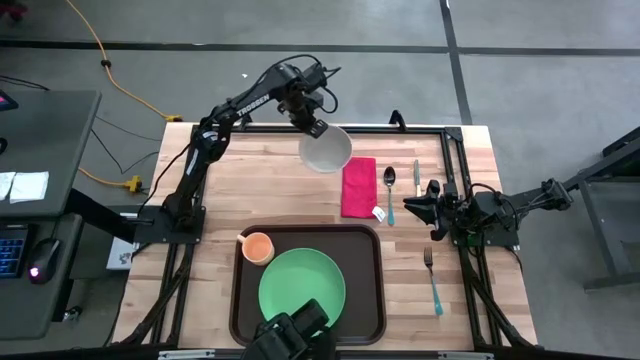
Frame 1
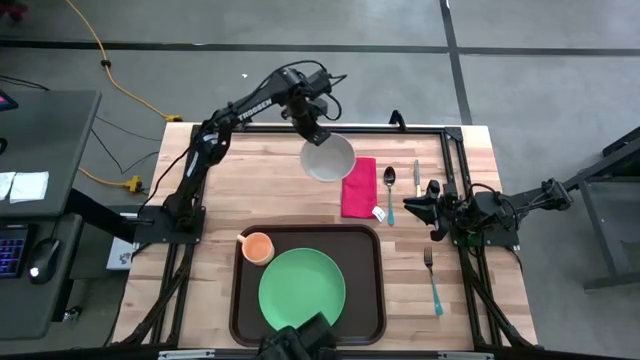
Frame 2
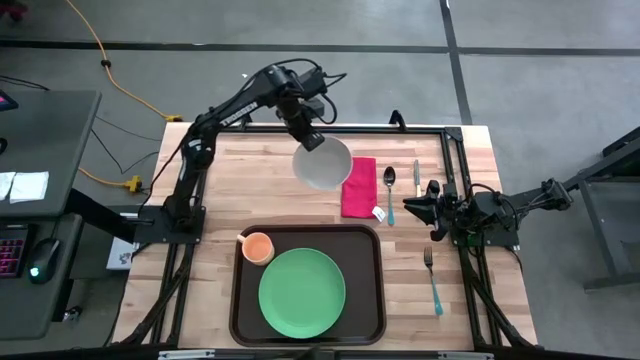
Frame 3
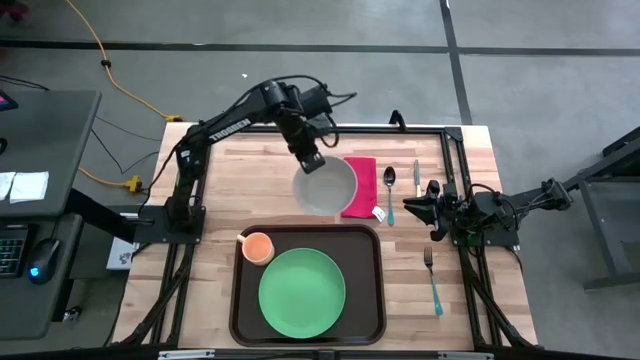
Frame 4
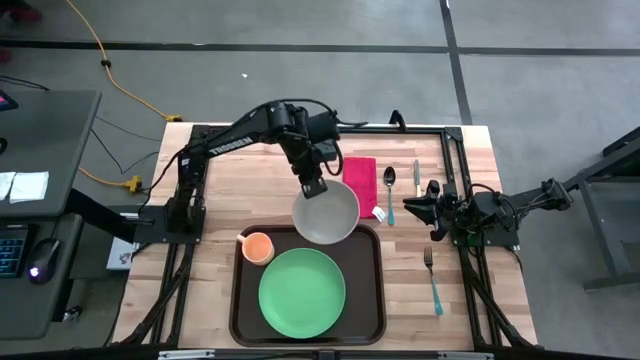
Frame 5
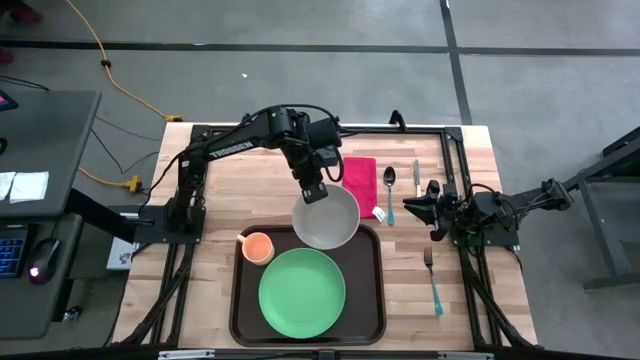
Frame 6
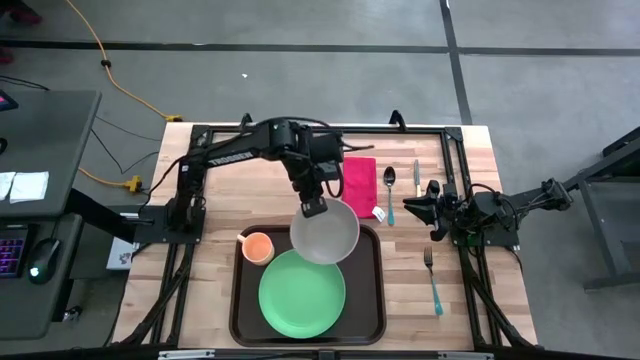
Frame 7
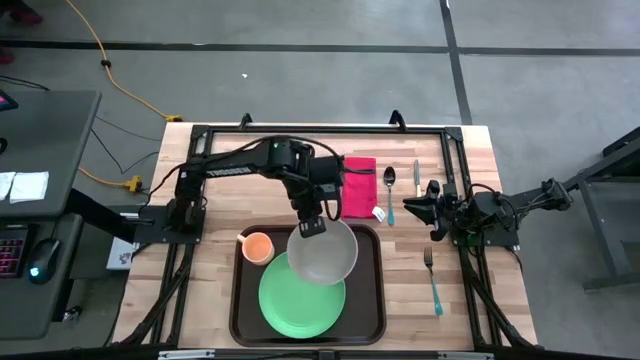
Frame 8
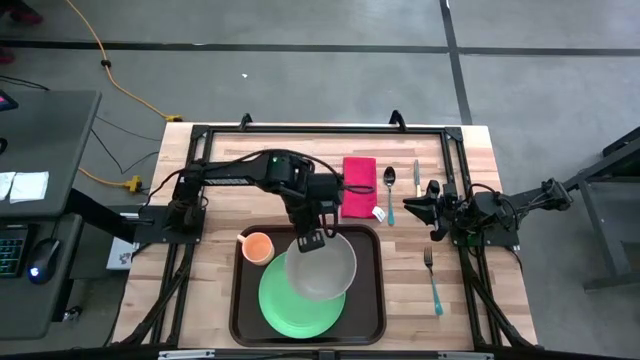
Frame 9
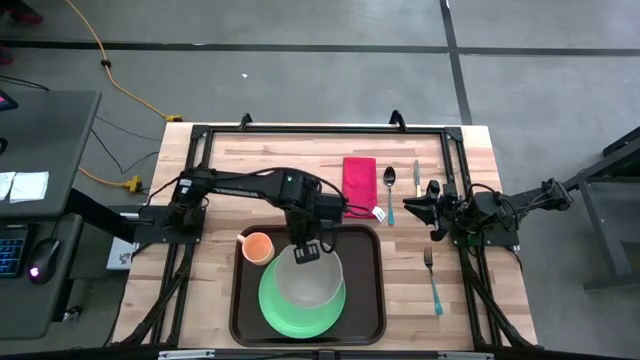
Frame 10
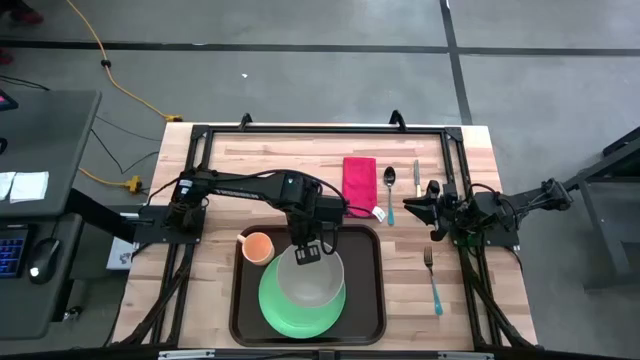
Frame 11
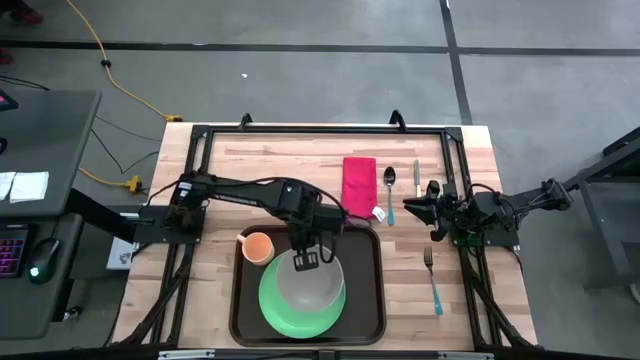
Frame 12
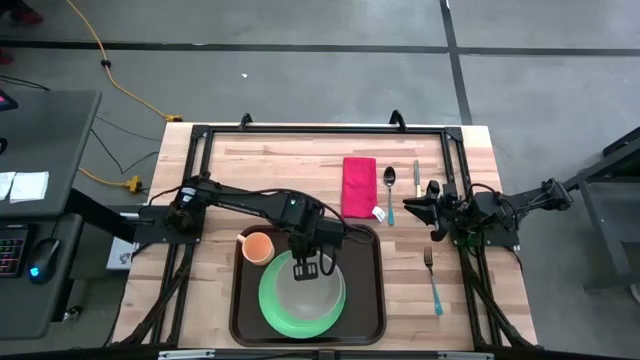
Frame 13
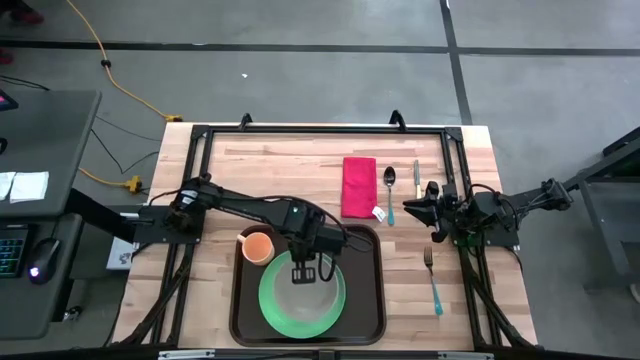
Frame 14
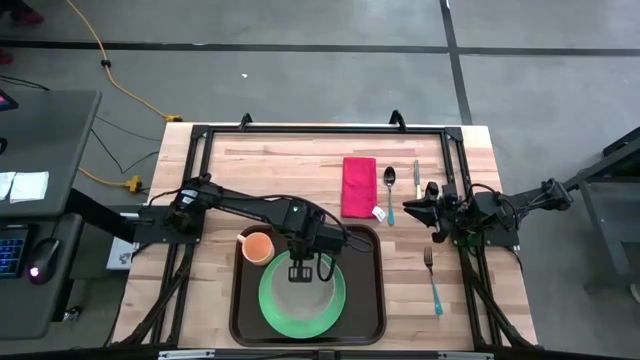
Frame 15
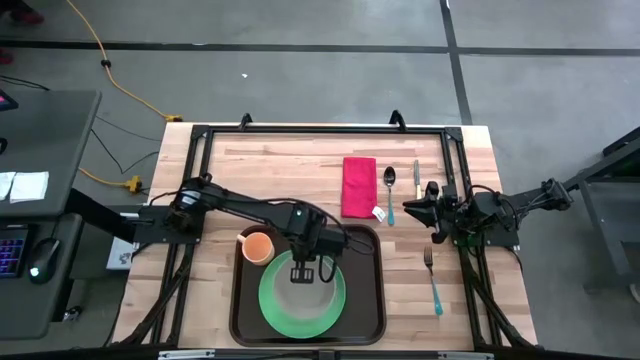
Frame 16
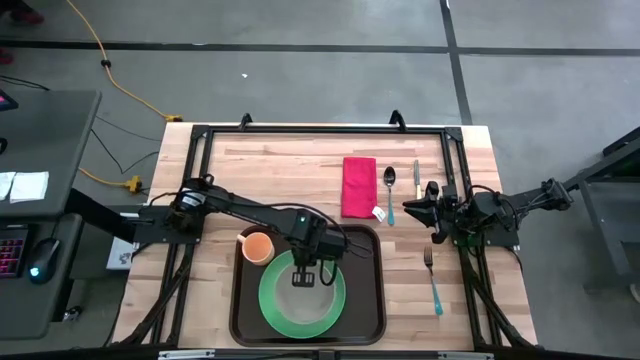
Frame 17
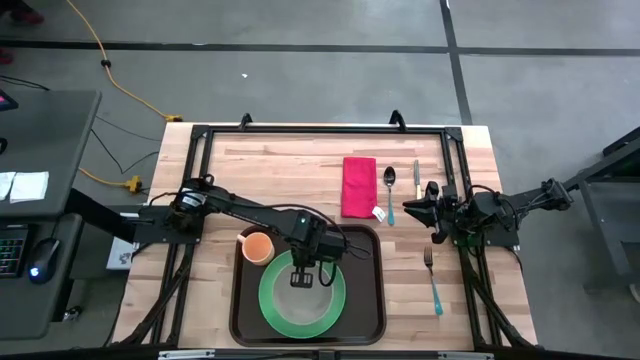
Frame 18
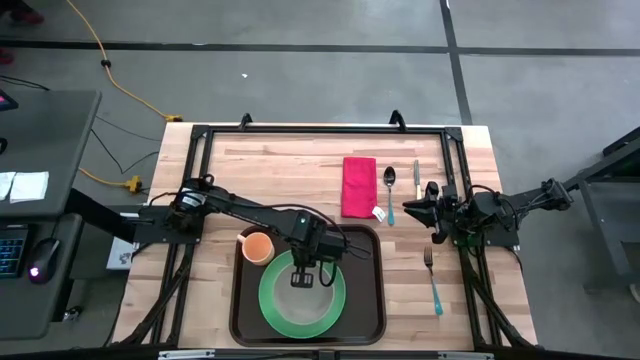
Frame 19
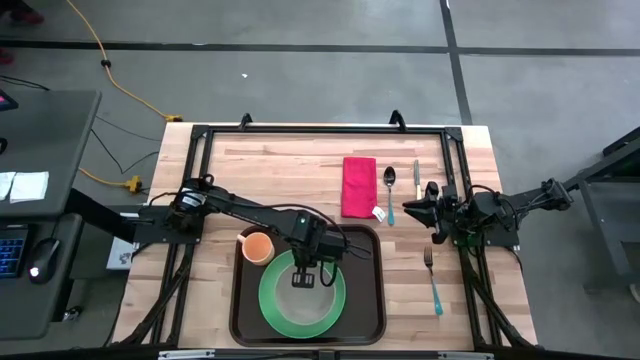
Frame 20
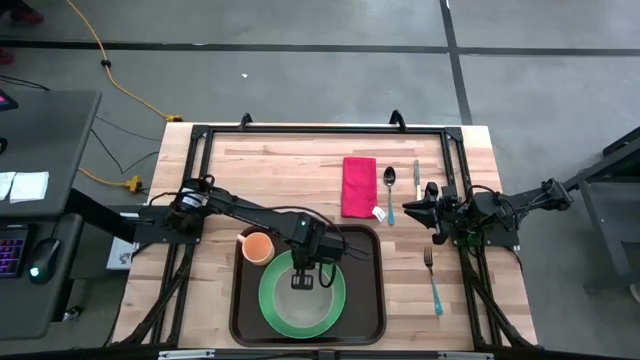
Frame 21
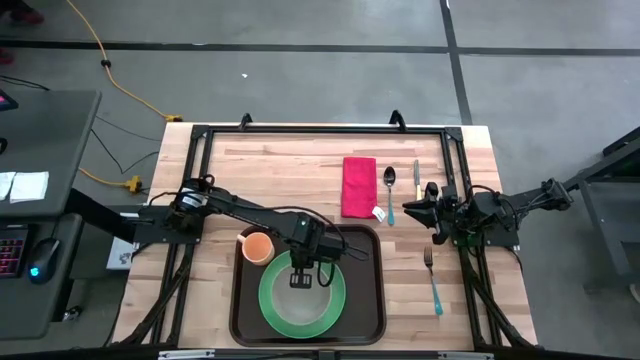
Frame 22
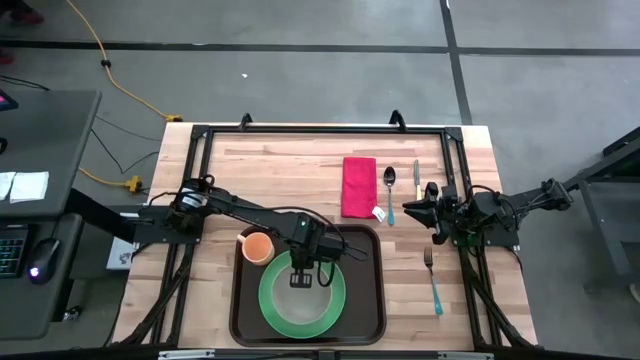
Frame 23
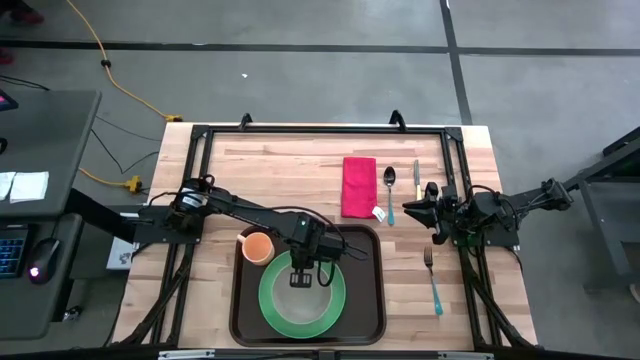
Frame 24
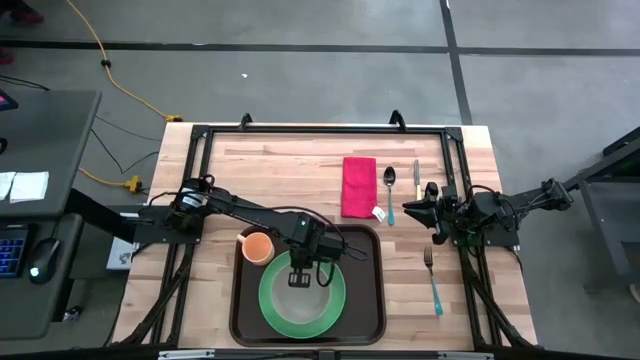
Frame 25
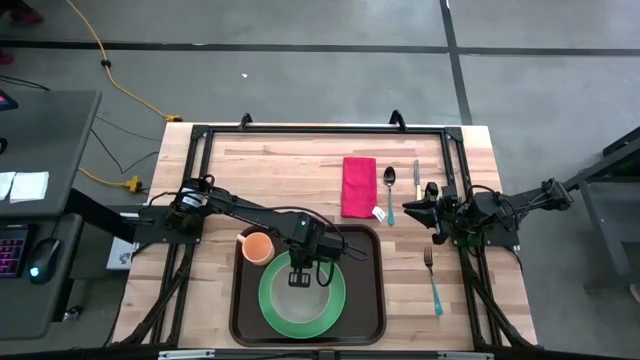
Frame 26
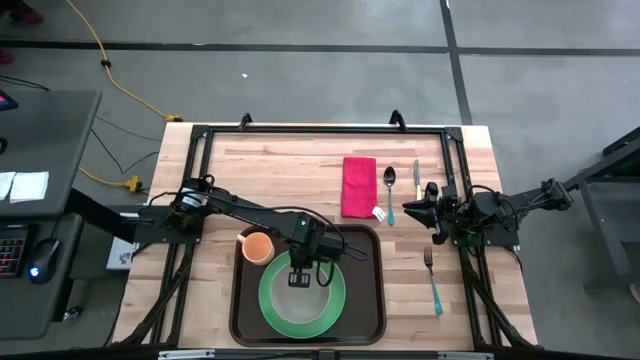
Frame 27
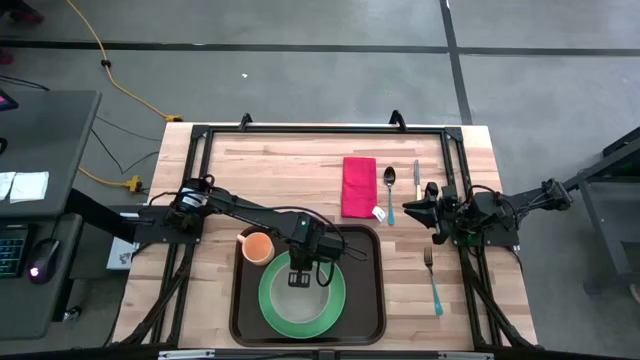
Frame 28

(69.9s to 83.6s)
Task: Set up tray
Put the gray bowl on the green plate

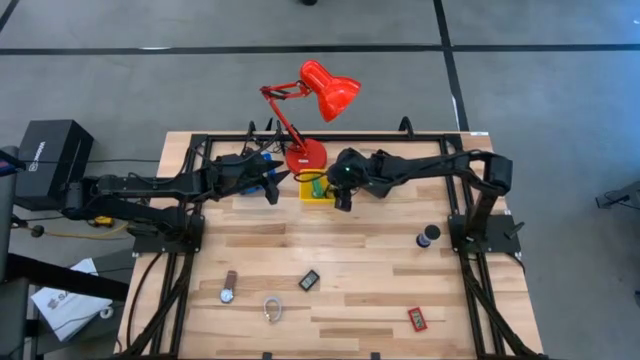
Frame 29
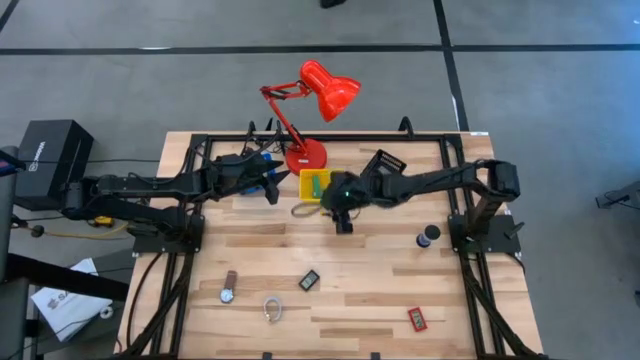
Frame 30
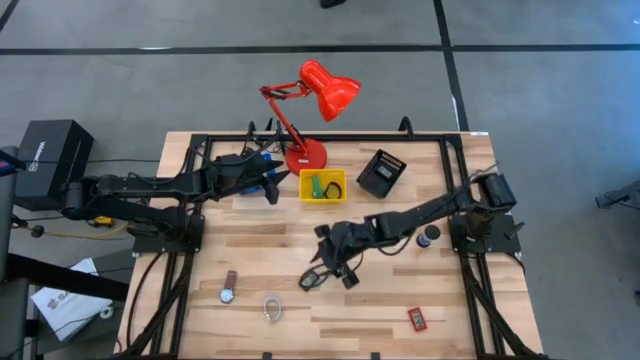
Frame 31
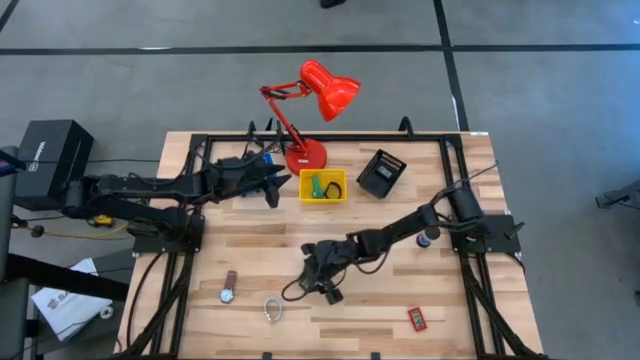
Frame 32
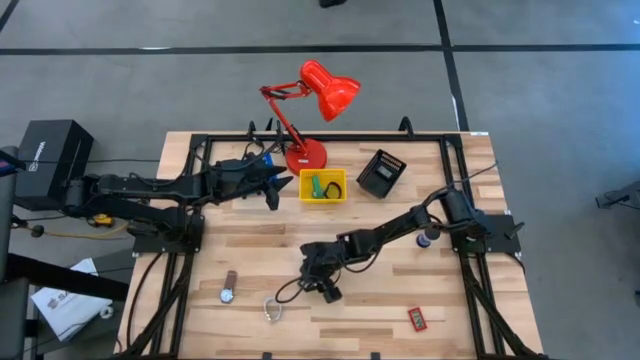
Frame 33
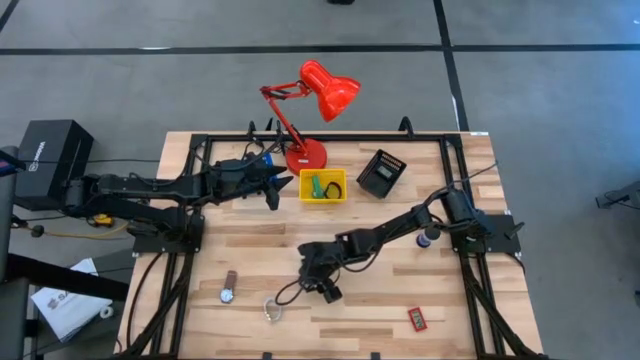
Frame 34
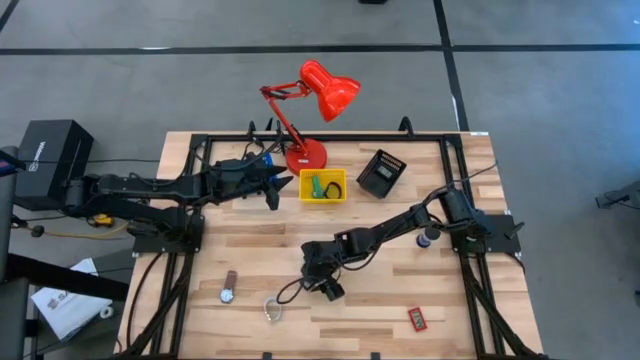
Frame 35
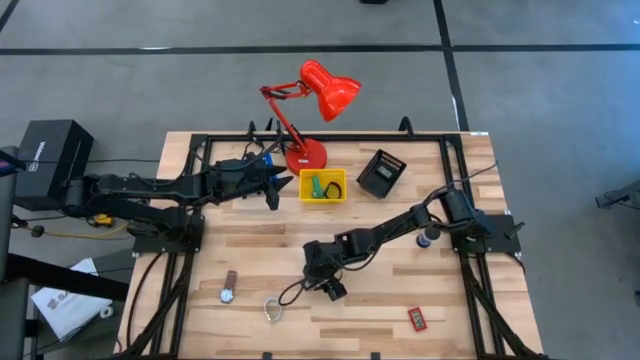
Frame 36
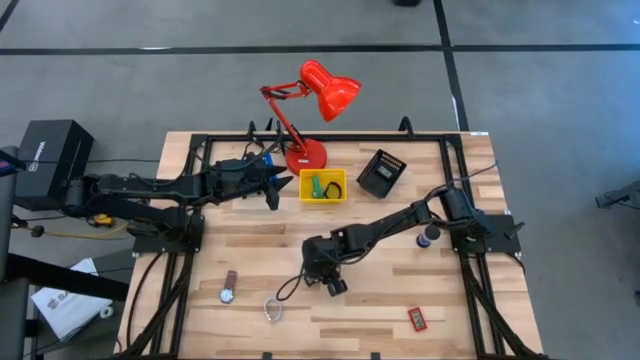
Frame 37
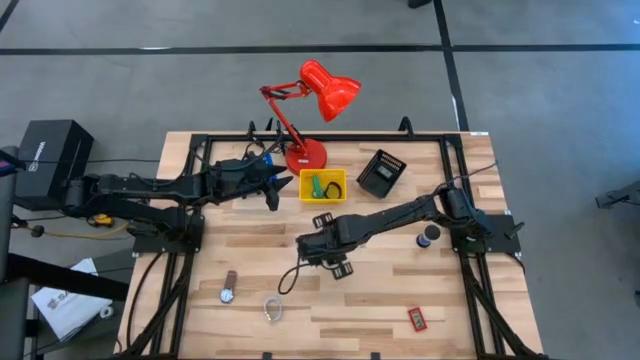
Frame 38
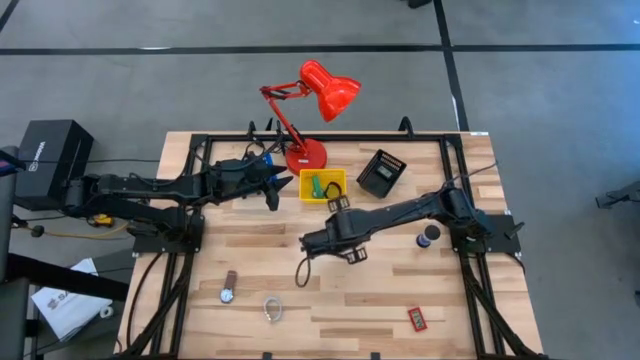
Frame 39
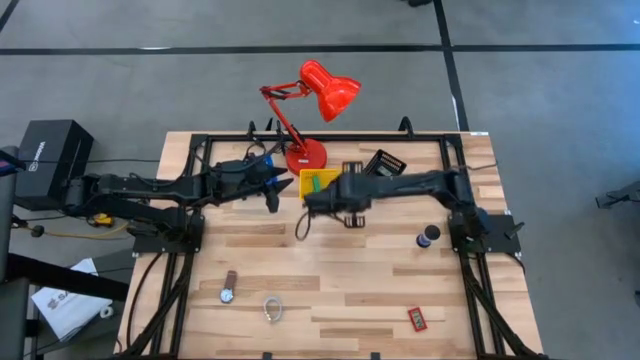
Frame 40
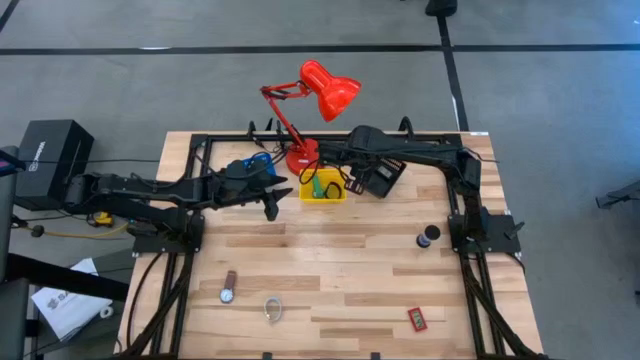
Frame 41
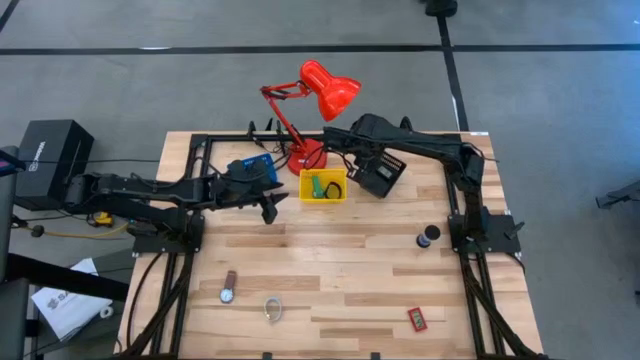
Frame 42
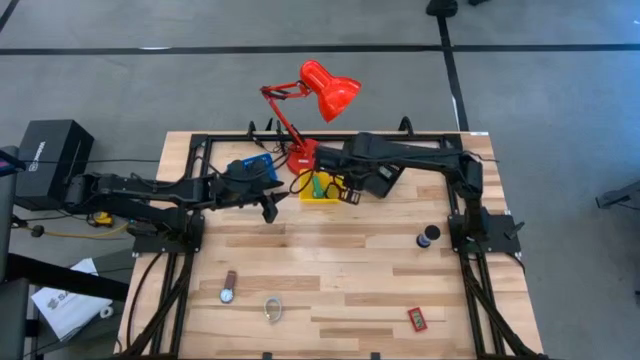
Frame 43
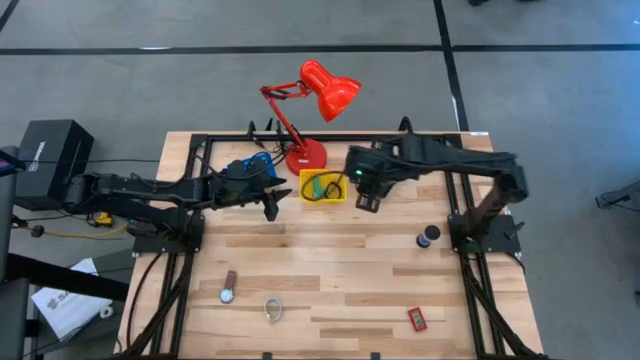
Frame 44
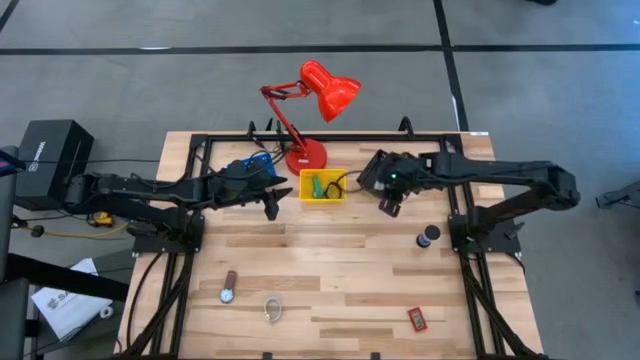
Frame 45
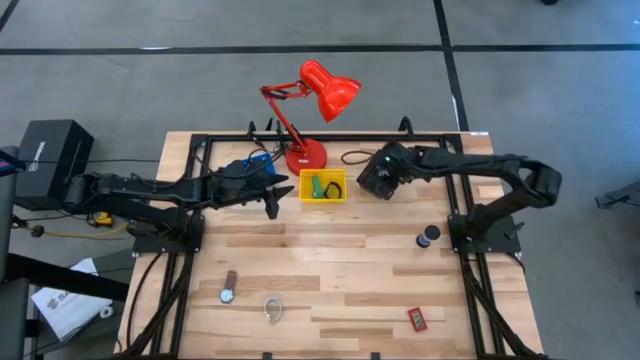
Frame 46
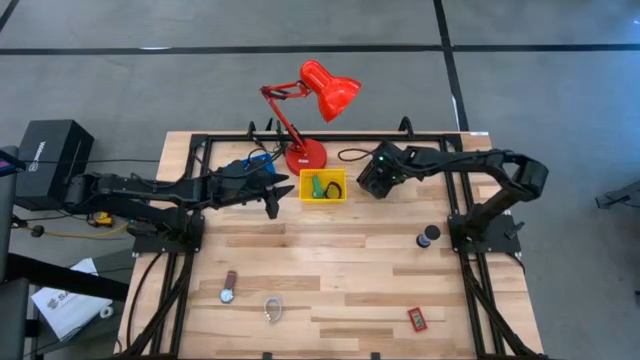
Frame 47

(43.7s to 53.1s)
Task: Pick & Place Office items
Put the black digital clock into the black bin
